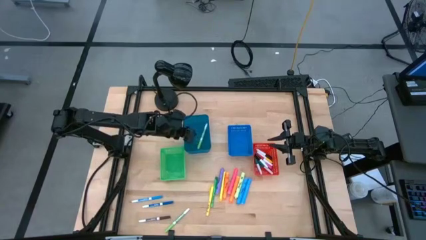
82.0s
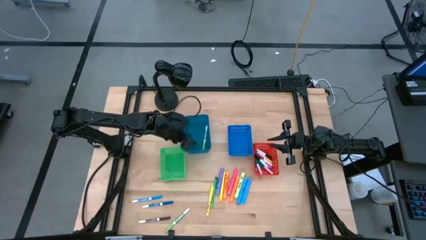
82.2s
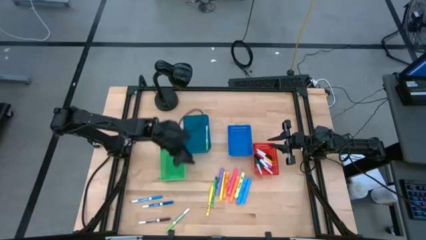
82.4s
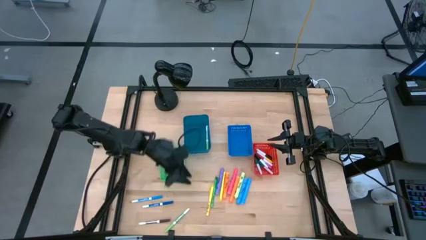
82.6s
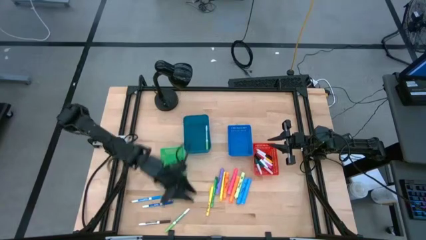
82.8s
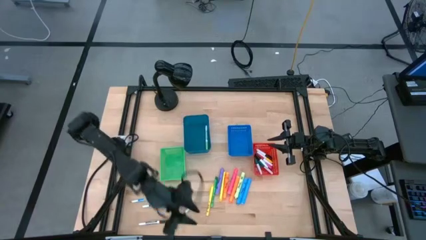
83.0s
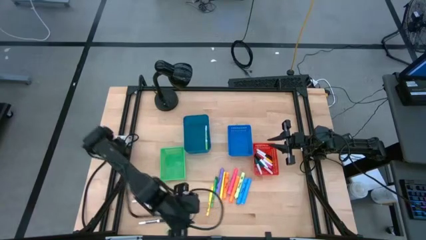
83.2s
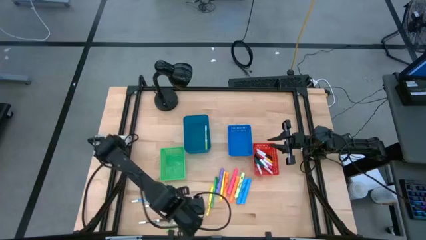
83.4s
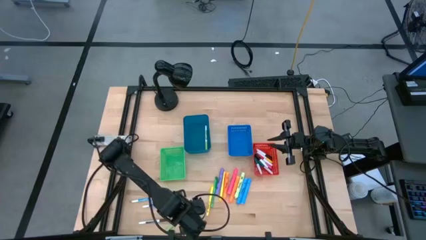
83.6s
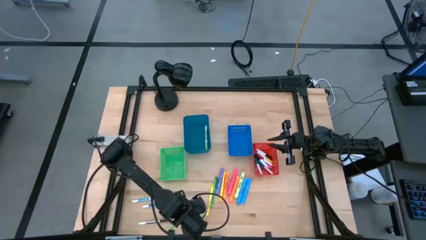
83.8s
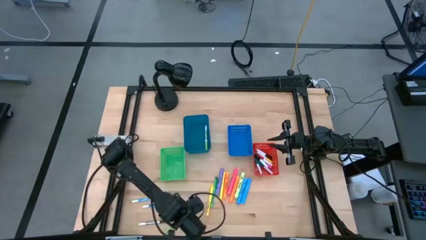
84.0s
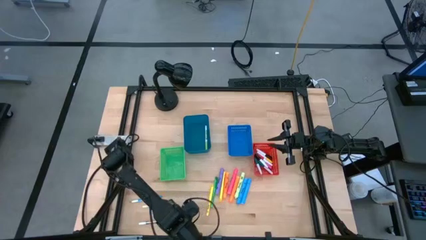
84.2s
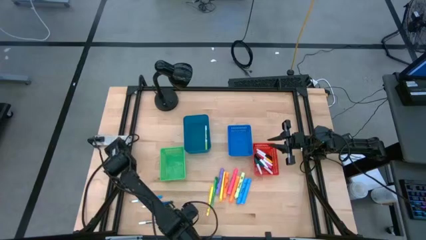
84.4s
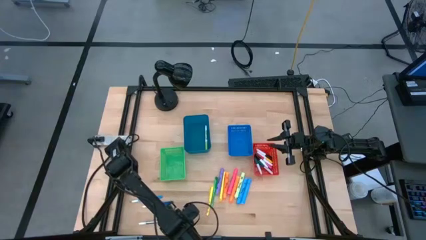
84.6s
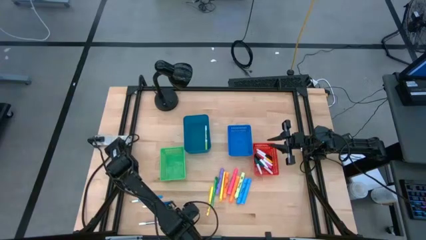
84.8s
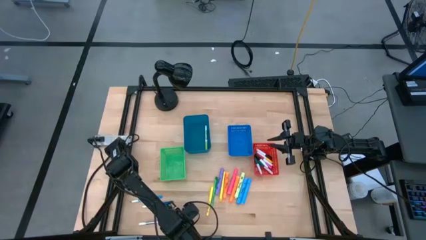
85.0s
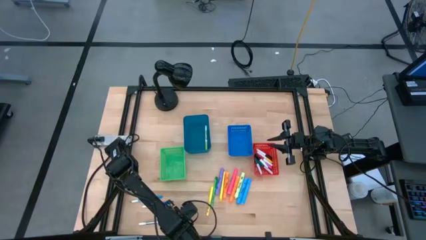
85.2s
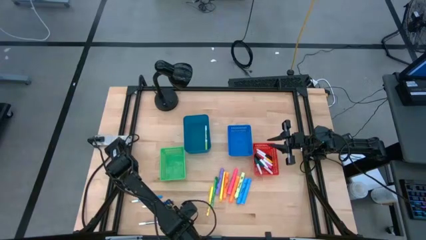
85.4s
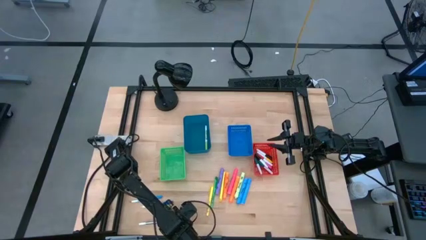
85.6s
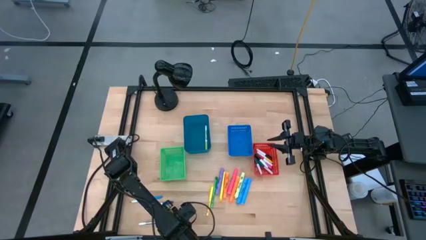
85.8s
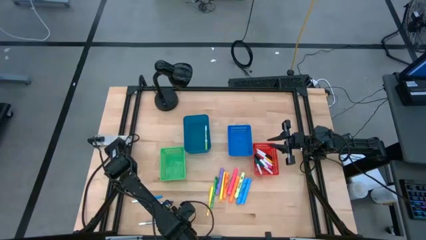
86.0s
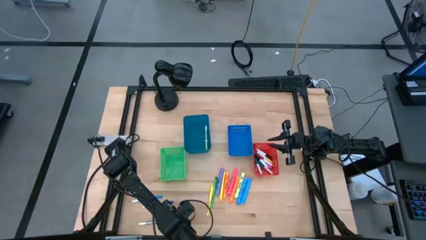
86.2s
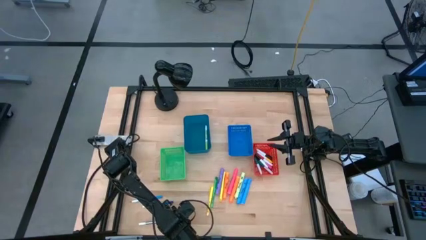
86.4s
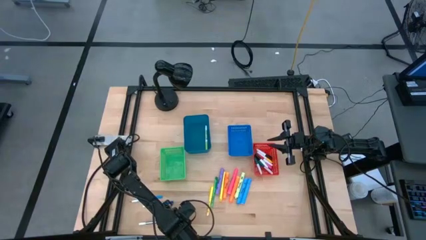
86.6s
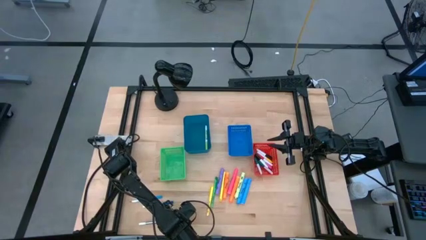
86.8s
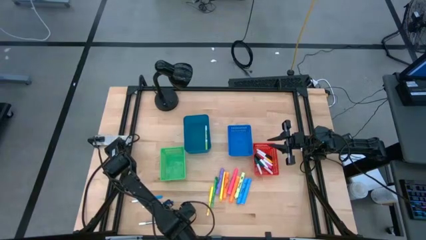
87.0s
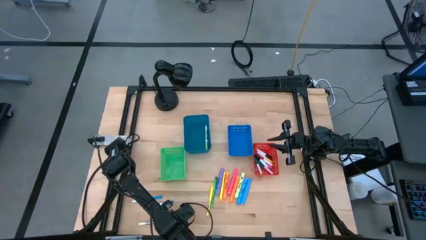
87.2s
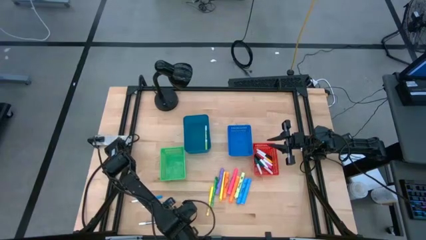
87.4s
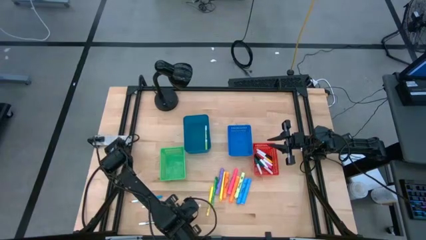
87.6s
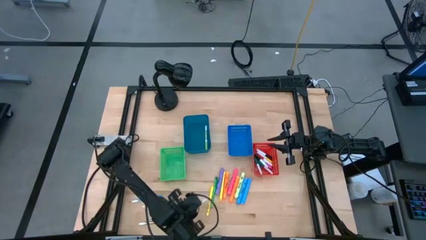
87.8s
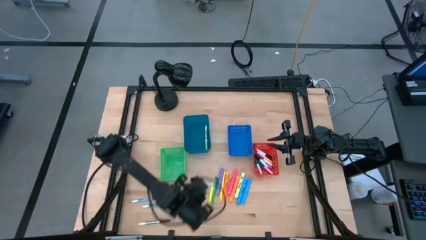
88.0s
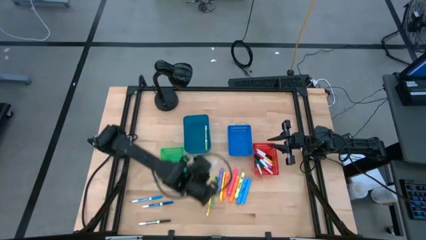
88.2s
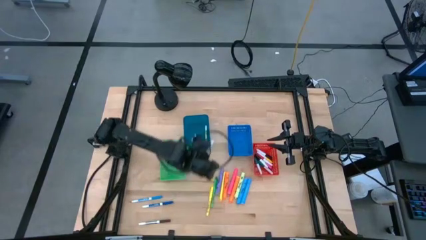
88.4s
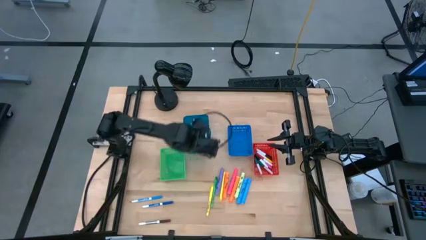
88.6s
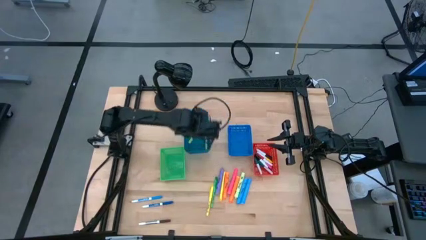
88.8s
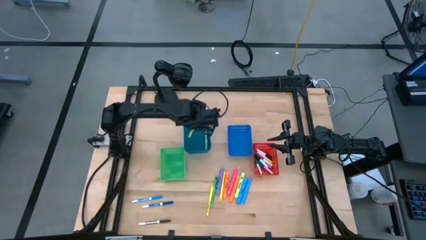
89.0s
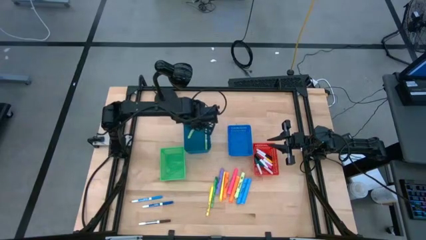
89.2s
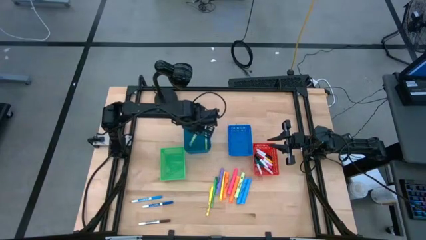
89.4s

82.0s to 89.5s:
Task: Pick & Place Markers
Put the green marker pen into the dark blue bin

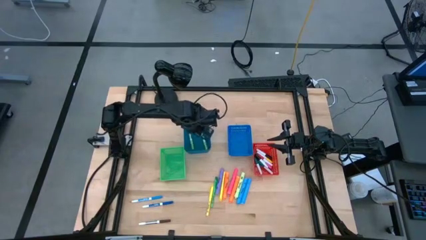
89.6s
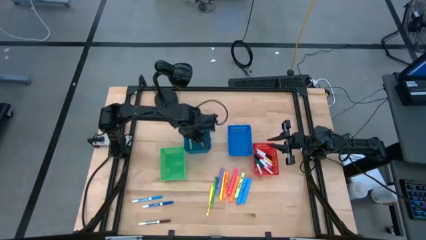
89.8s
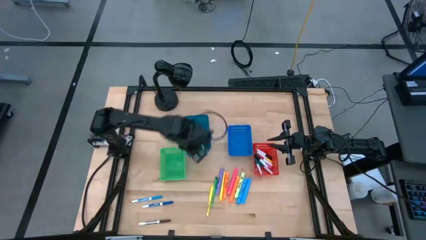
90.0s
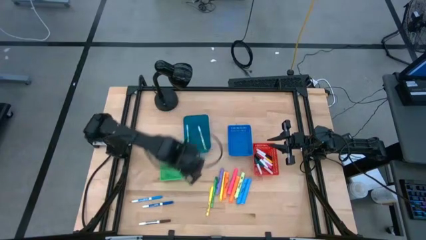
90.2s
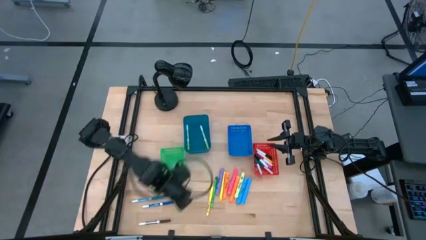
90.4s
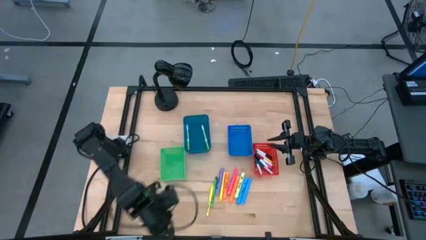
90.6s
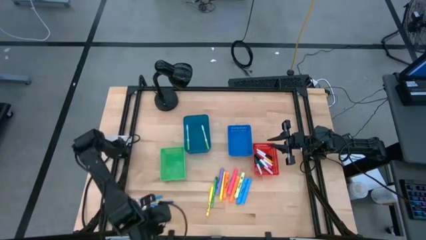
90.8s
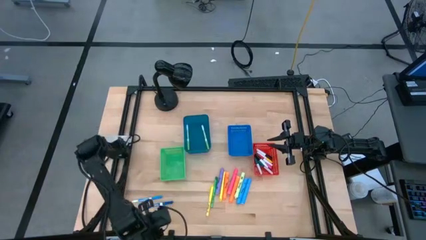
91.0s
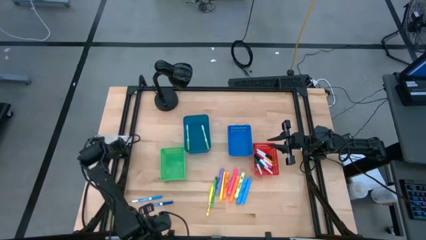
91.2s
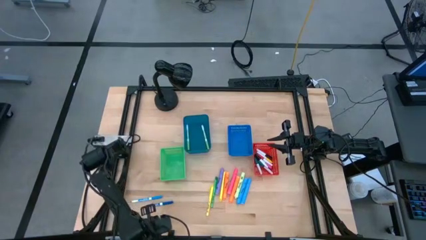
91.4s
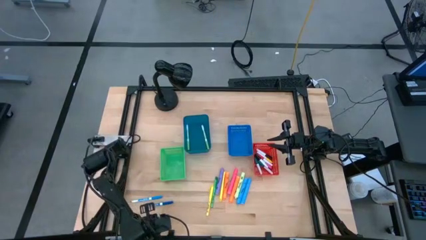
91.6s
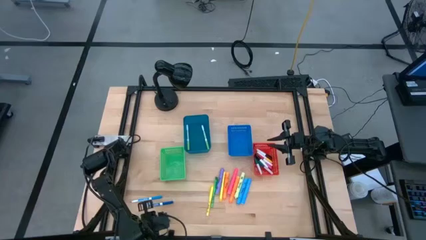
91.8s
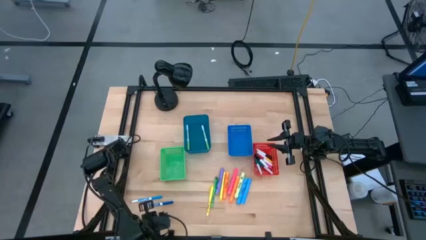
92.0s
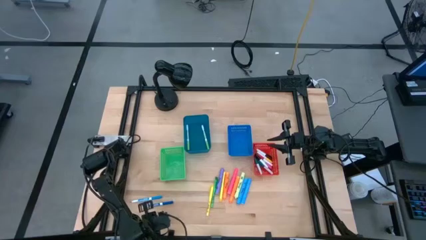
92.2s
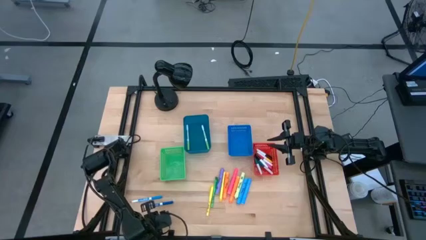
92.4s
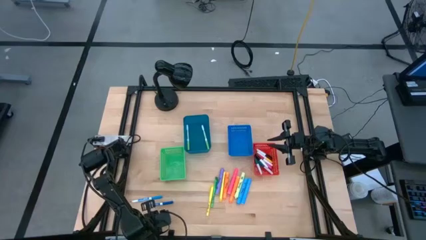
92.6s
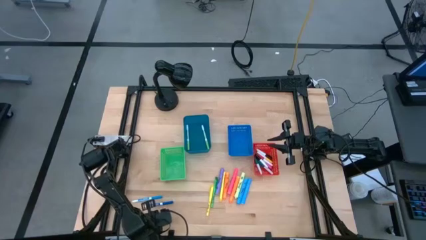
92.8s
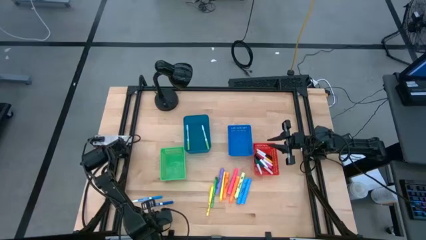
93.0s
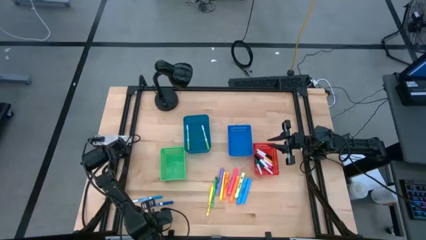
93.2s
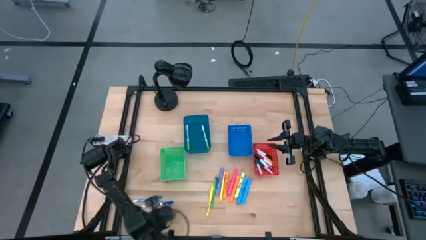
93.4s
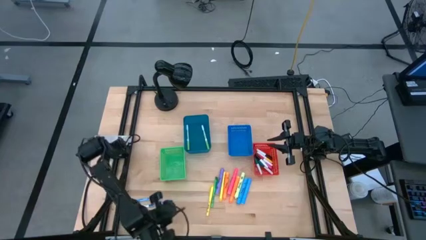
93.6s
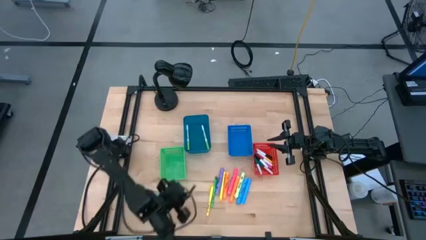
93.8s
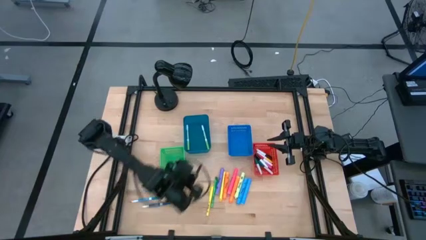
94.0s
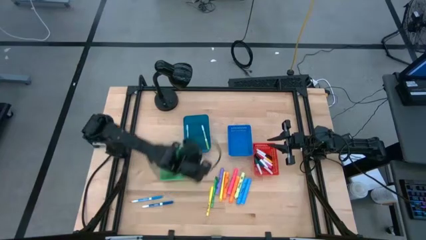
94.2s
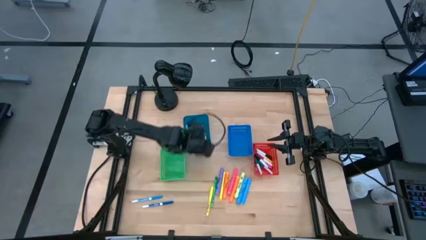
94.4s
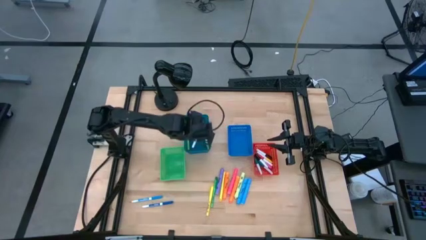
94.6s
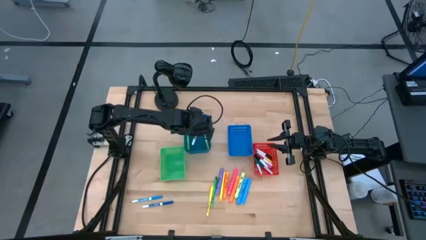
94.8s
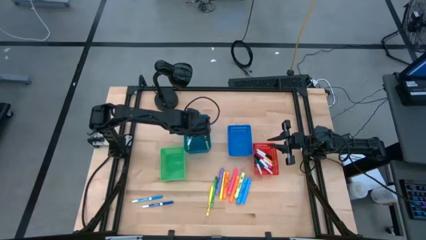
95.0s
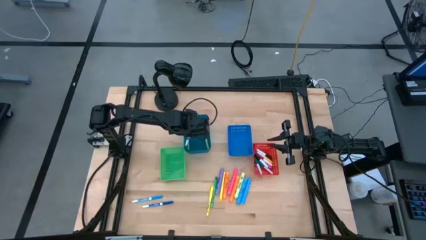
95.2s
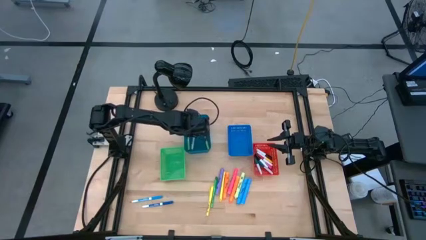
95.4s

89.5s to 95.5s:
Put the brown marker pen into the dark blue bin

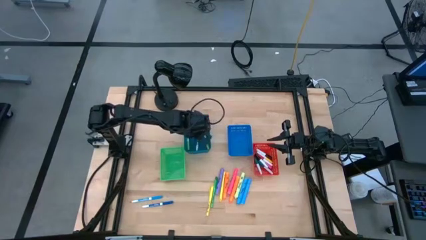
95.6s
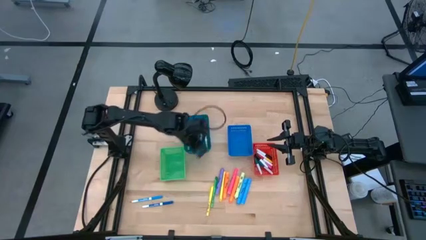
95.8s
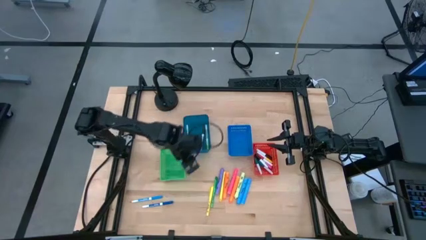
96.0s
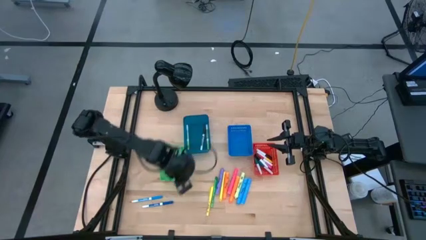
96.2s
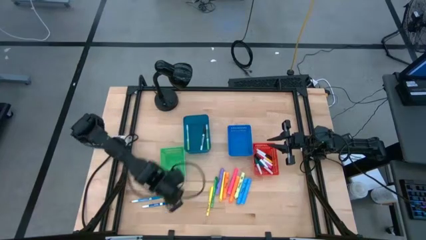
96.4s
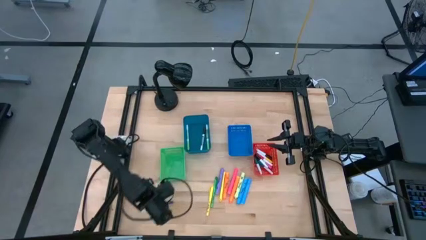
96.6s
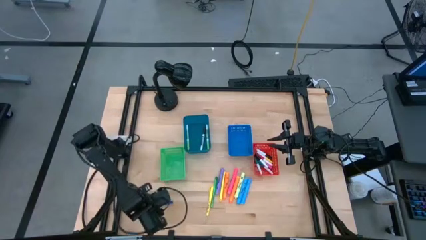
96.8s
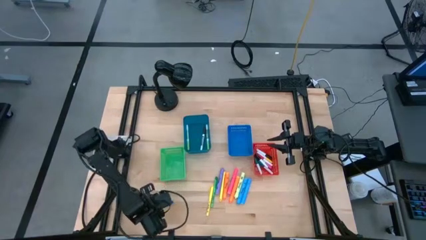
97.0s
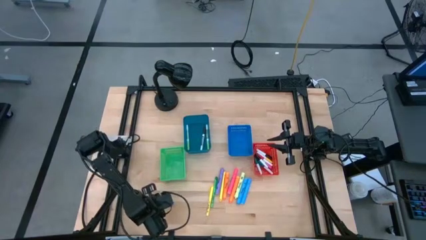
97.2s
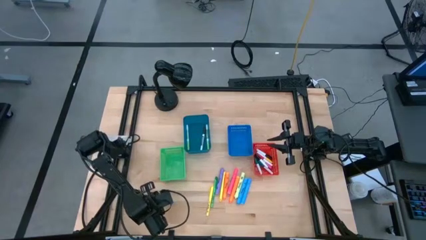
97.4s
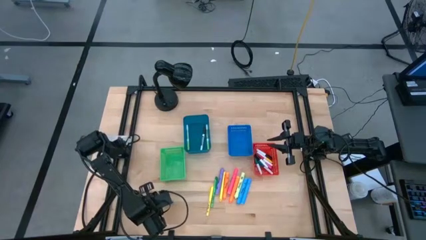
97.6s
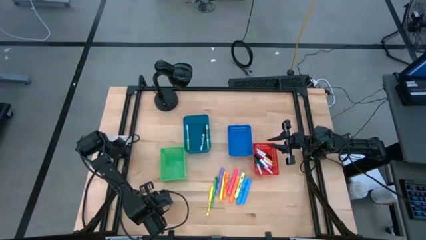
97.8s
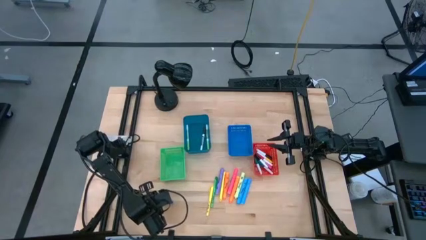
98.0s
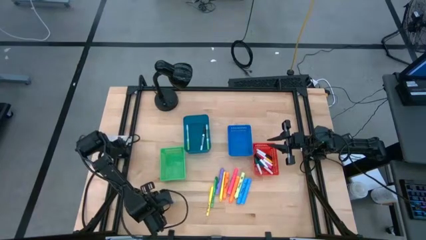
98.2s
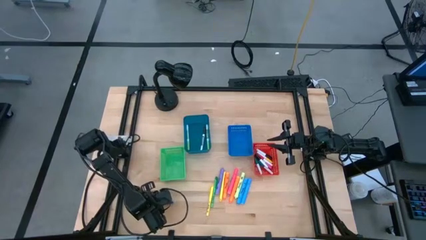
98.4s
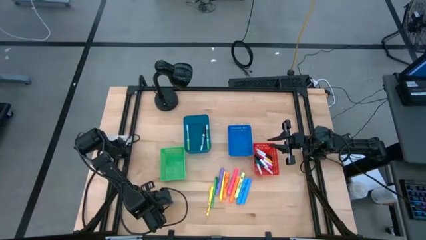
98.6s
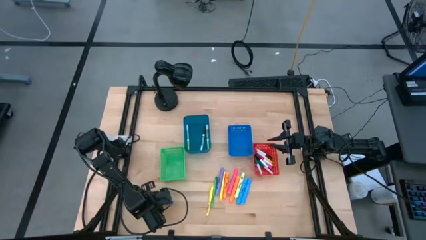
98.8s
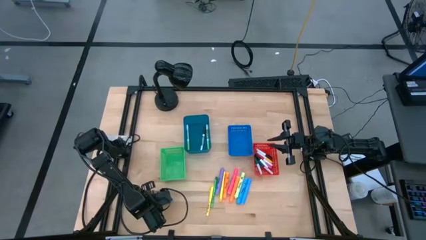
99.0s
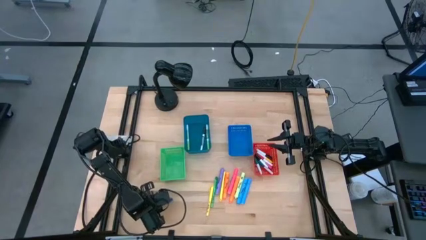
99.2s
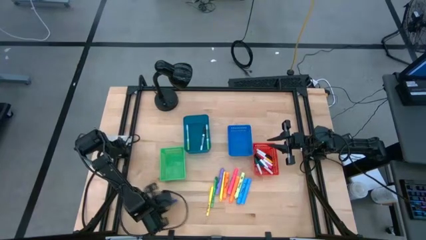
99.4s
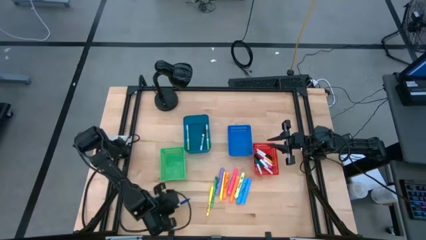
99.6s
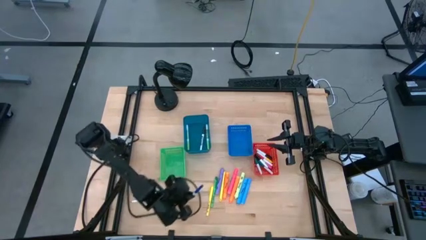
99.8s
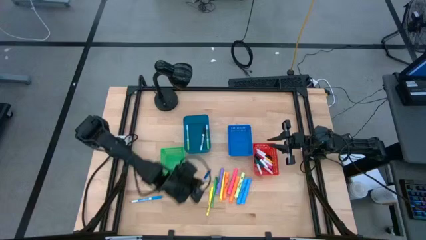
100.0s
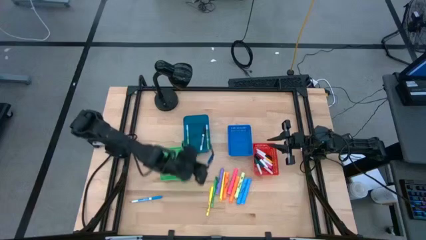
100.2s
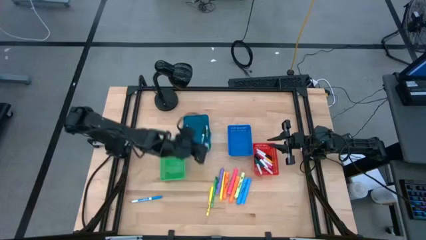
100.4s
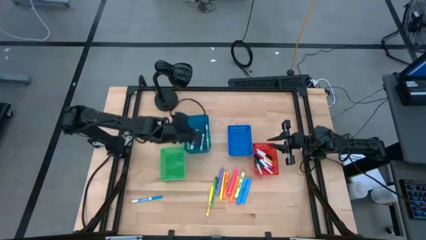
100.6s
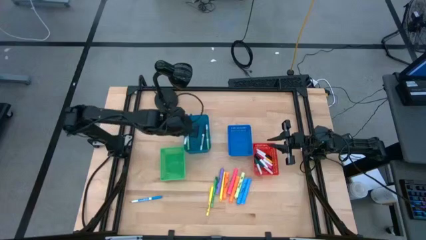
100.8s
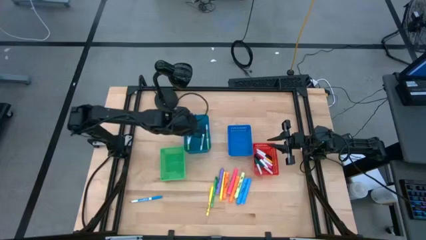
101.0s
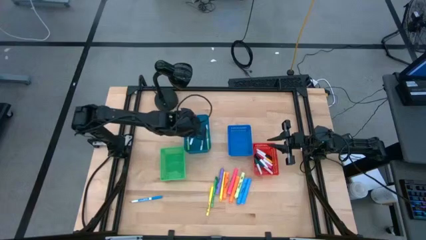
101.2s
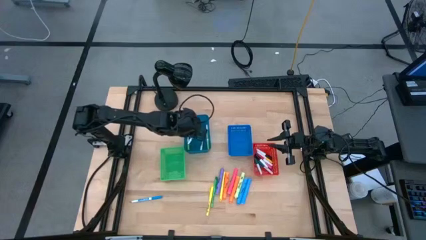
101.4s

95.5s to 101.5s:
Put the dark blue marker pen into the dark blue bin
